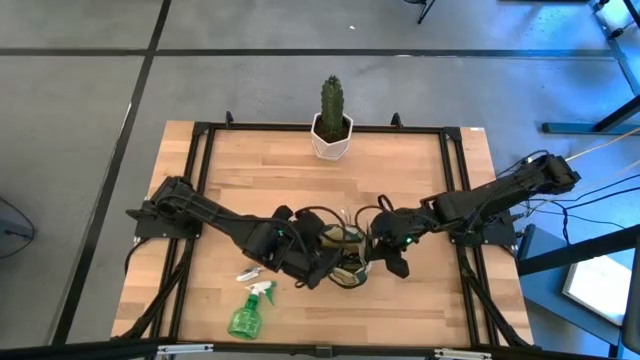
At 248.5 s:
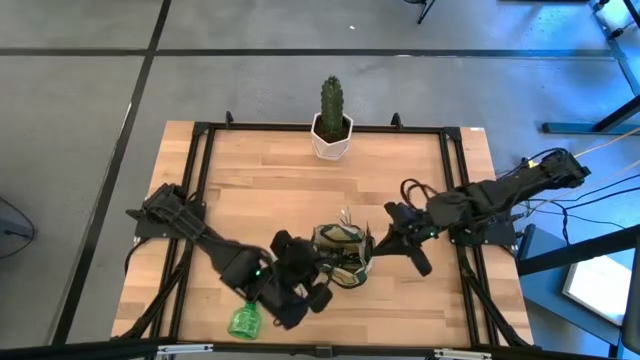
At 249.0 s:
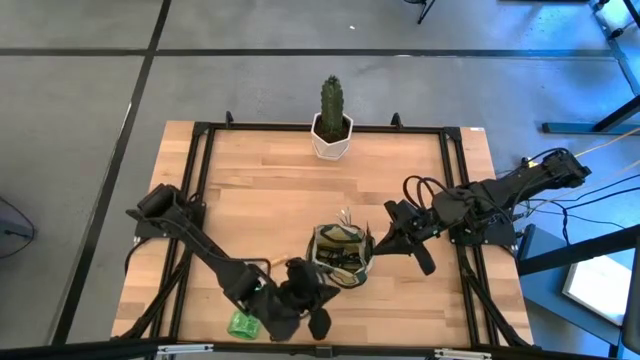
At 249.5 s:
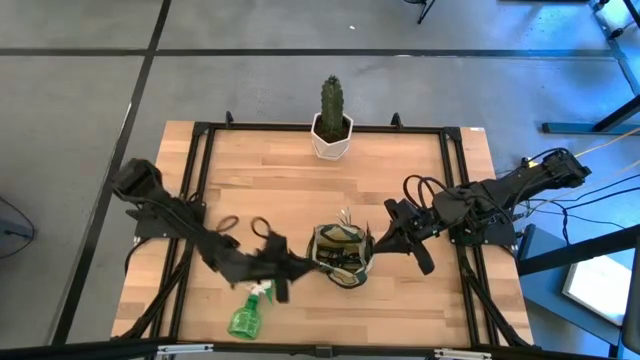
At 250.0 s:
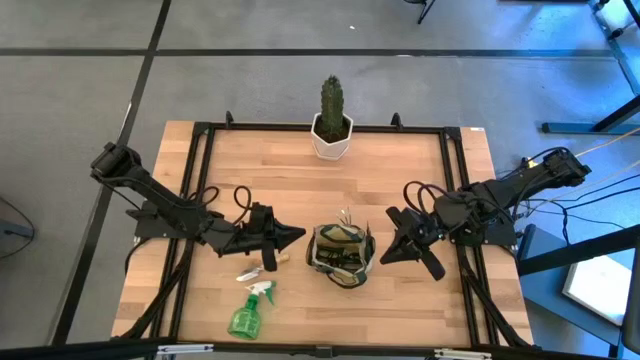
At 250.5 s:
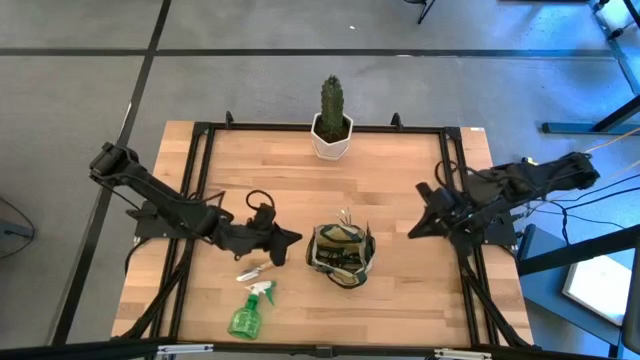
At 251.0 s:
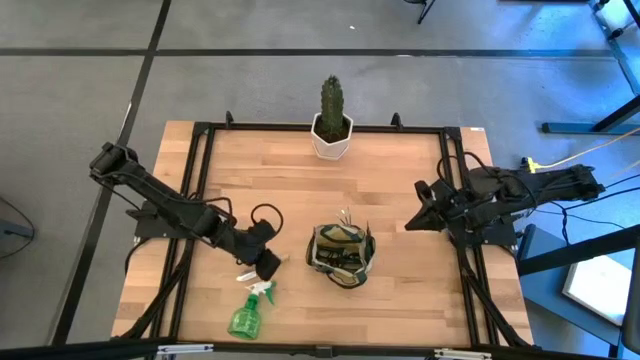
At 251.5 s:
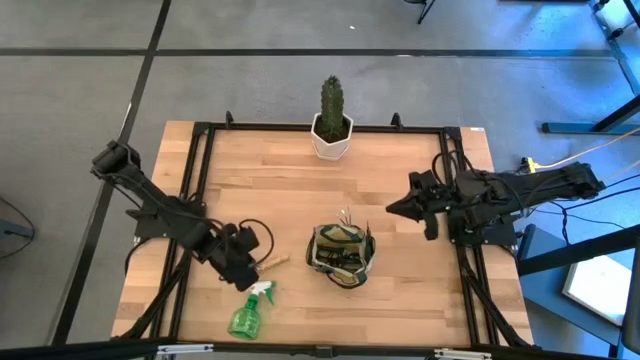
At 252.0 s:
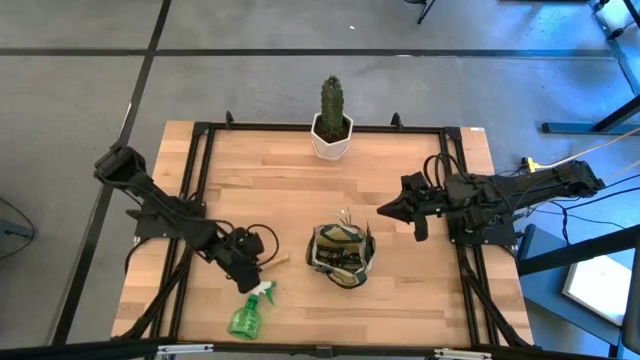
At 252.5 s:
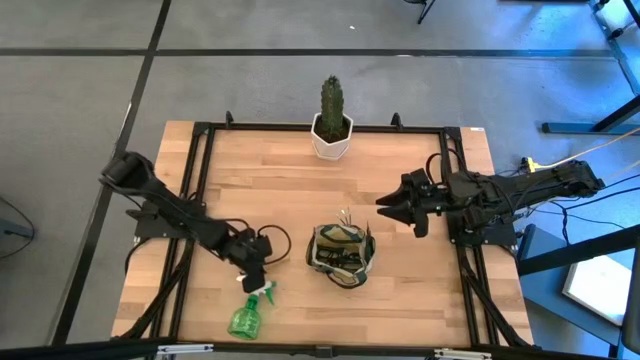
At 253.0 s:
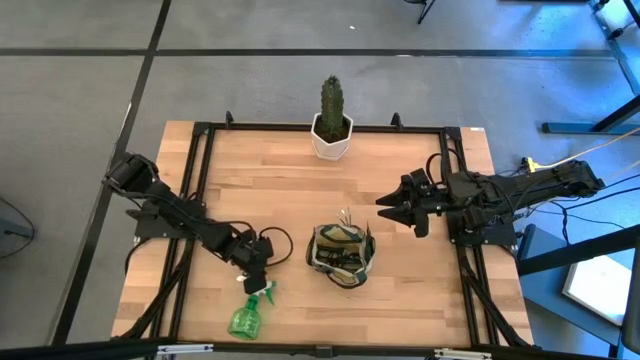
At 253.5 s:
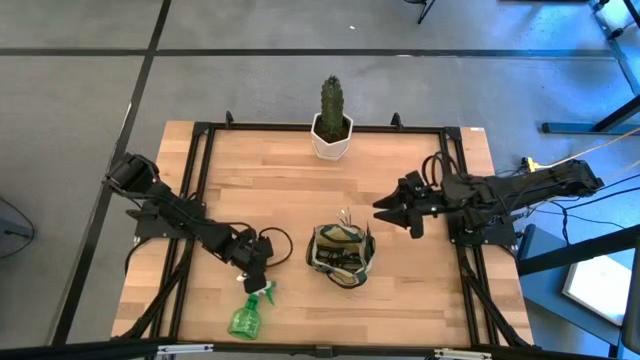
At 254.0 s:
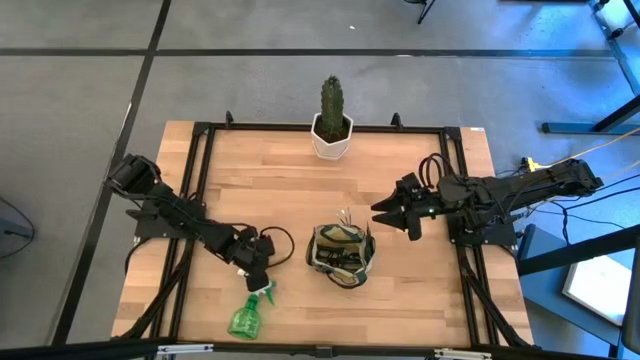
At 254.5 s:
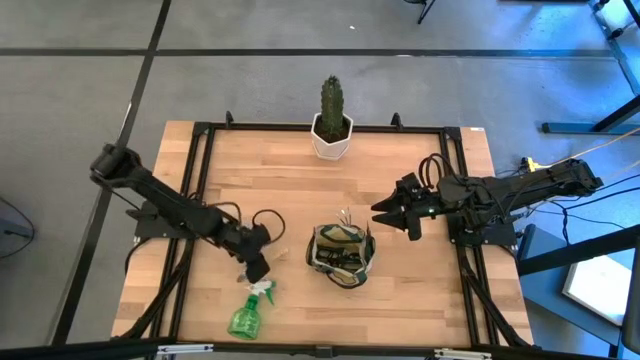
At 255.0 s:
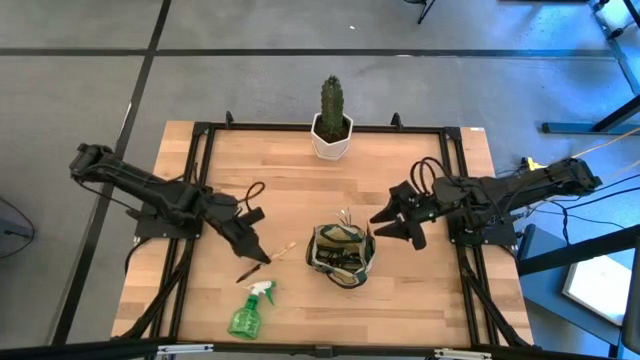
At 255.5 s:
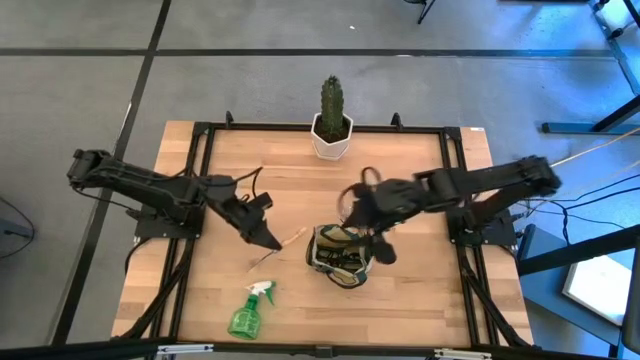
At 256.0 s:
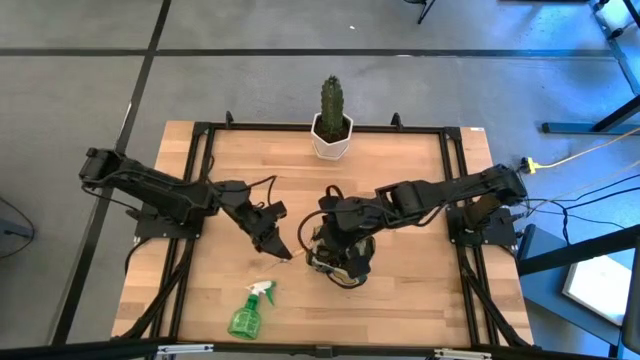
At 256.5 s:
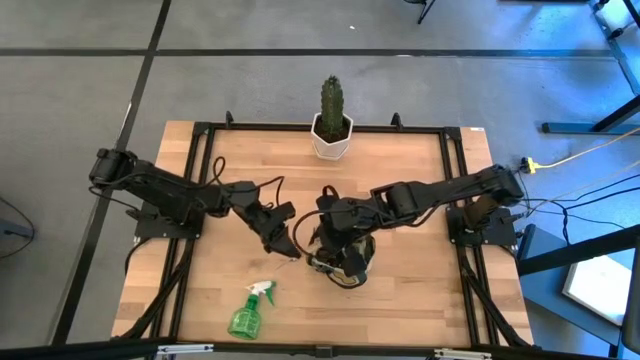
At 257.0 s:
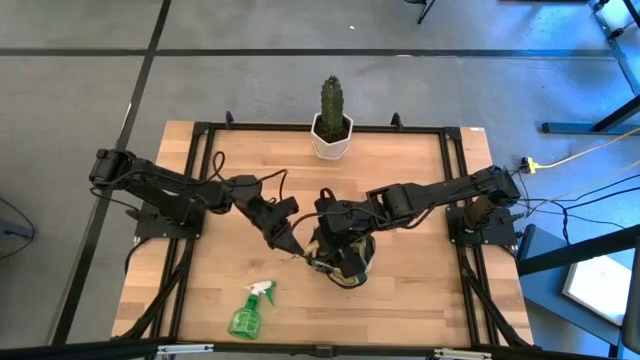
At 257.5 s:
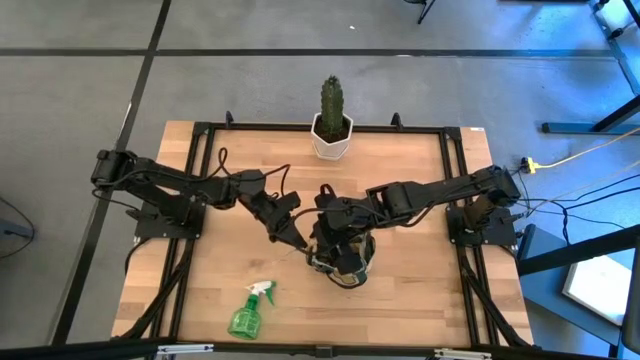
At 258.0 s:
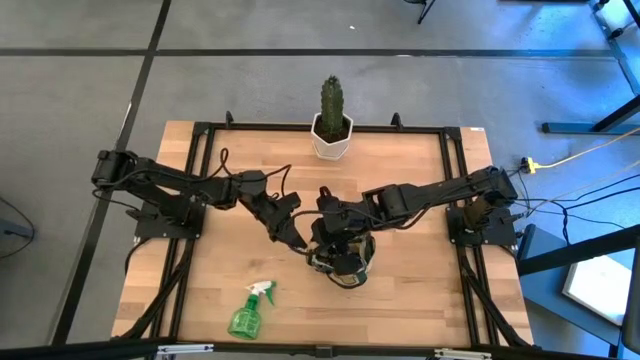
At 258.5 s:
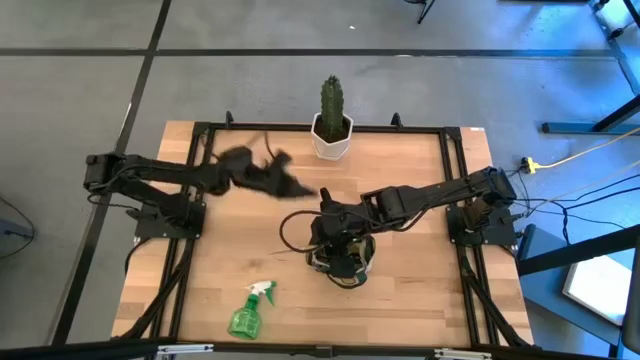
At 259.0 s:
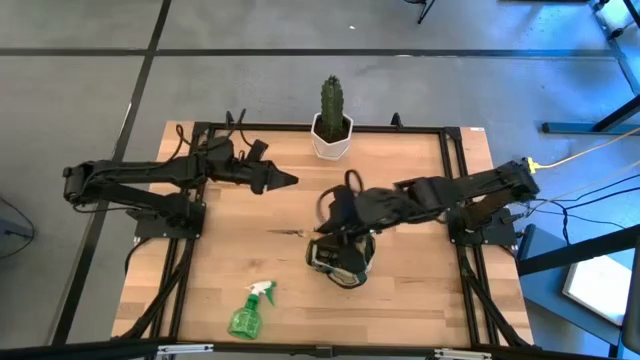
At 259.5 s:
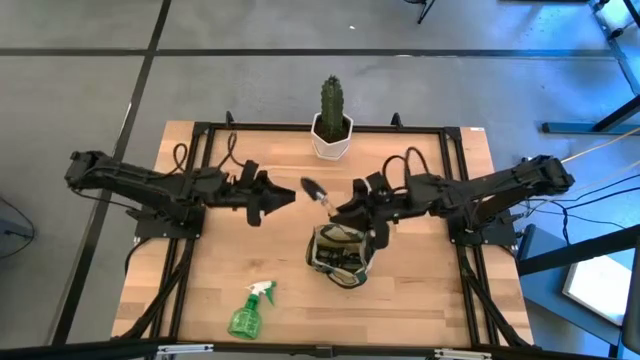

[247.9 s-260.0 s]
Task: Pick & Place Garden tools in Gardening bag
Put the brown trowel into the green gardening bag

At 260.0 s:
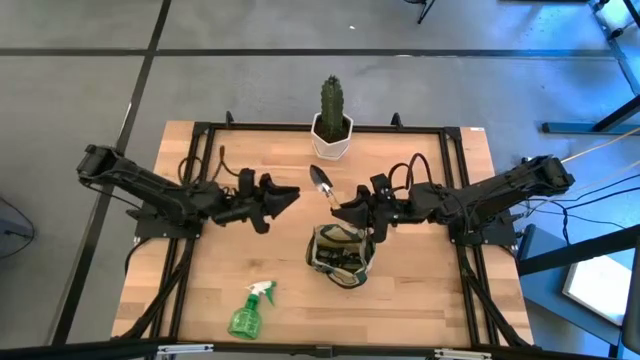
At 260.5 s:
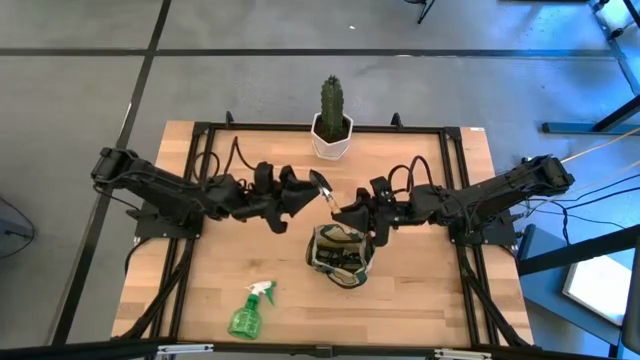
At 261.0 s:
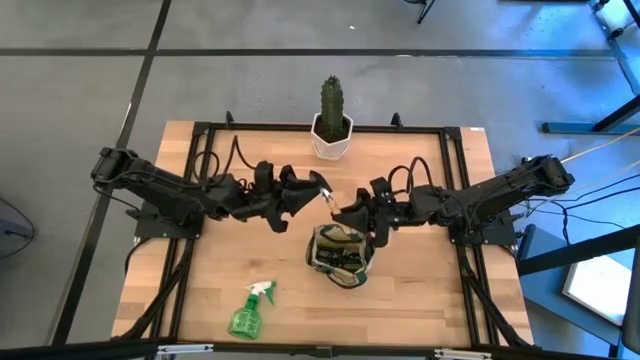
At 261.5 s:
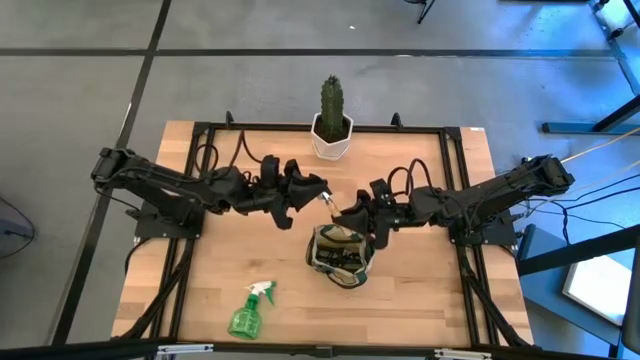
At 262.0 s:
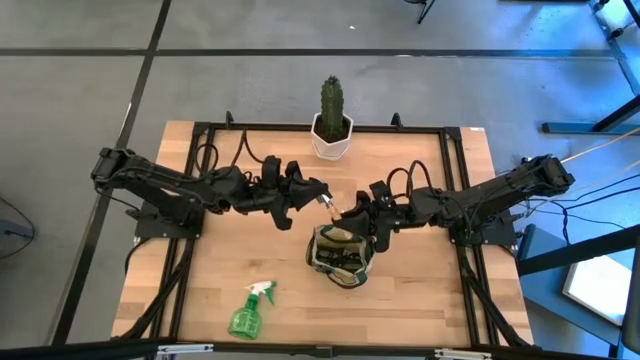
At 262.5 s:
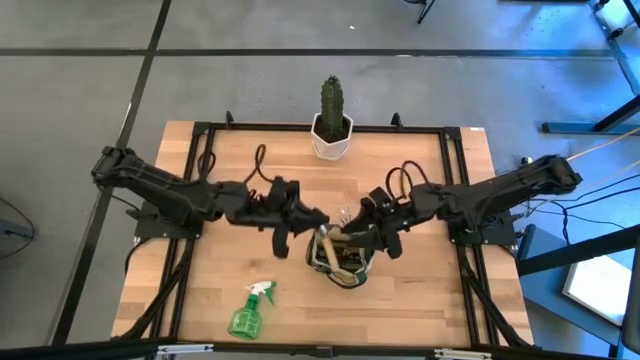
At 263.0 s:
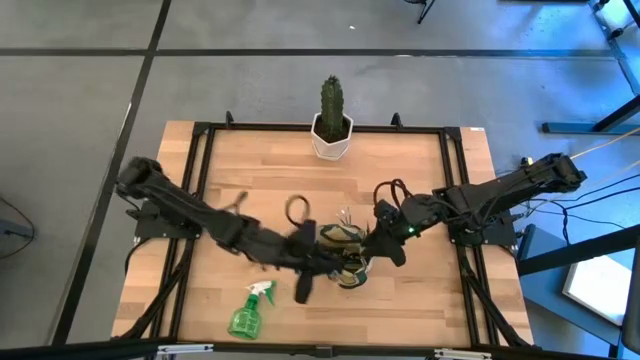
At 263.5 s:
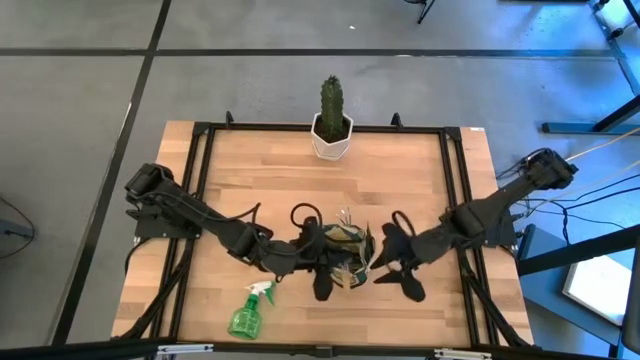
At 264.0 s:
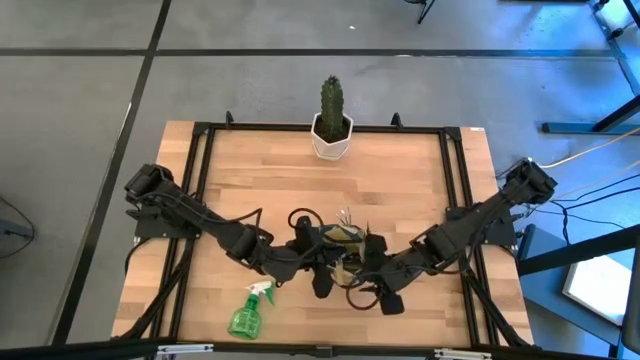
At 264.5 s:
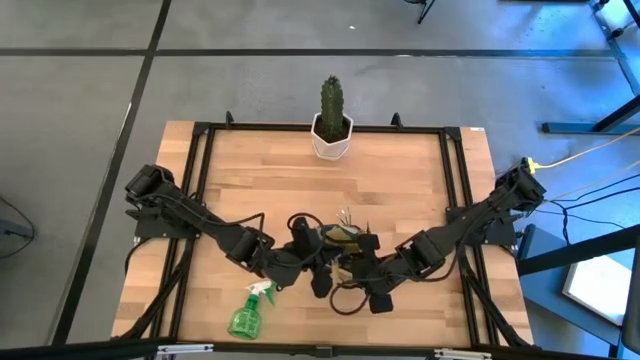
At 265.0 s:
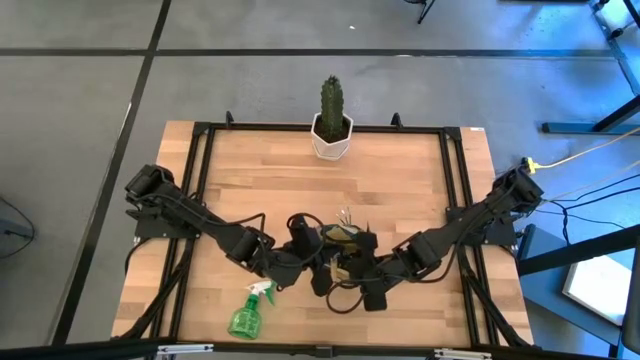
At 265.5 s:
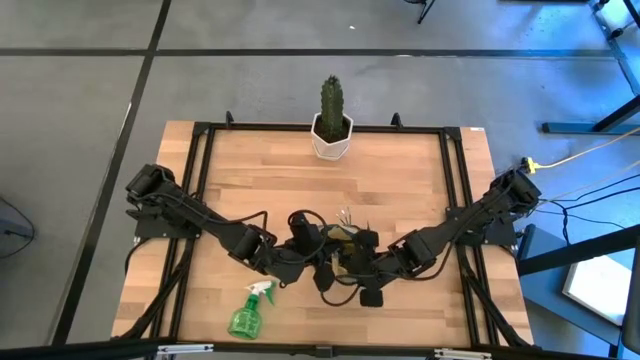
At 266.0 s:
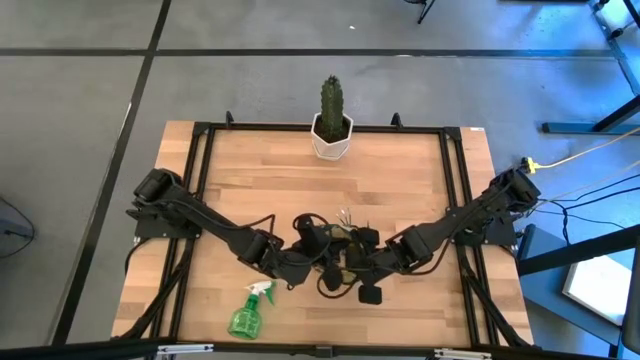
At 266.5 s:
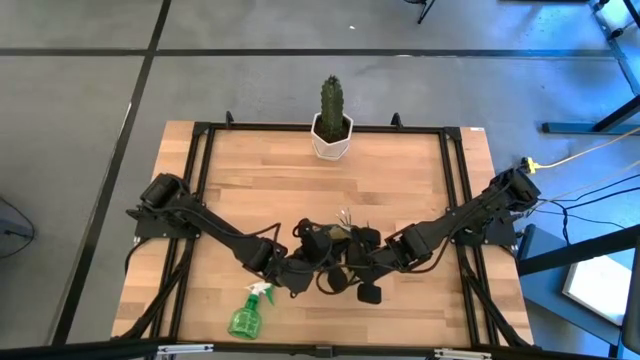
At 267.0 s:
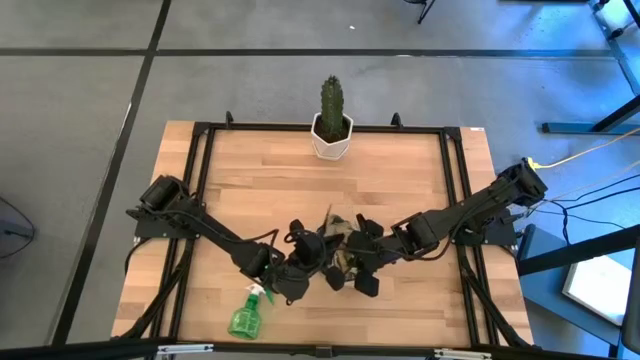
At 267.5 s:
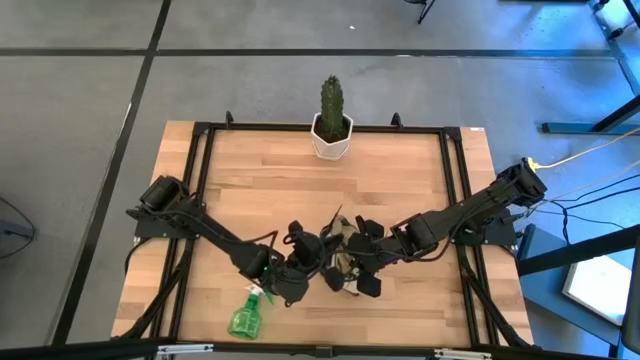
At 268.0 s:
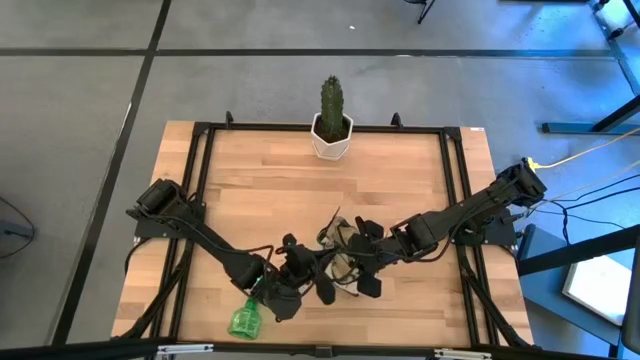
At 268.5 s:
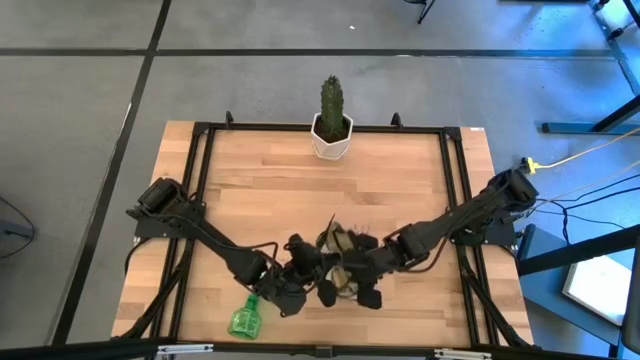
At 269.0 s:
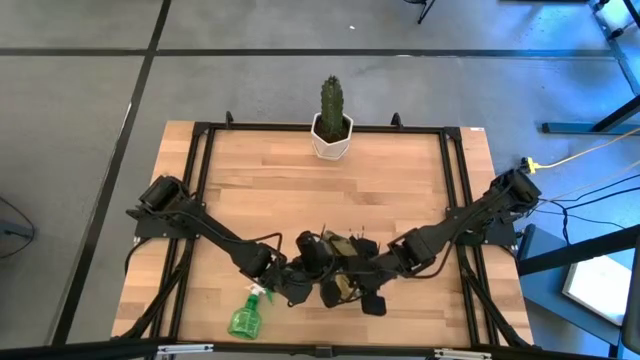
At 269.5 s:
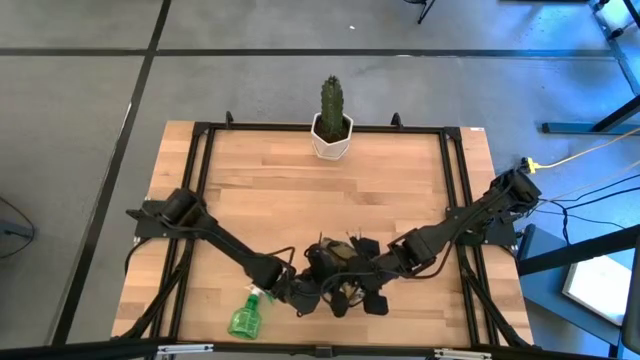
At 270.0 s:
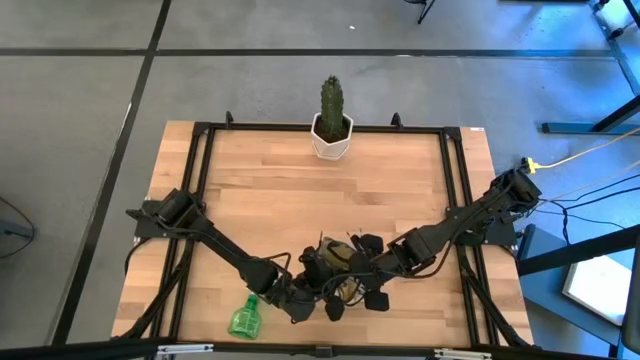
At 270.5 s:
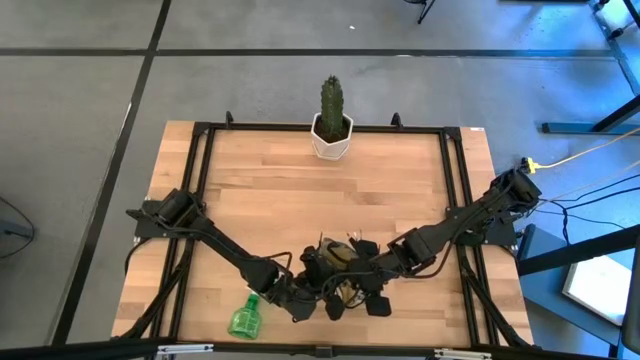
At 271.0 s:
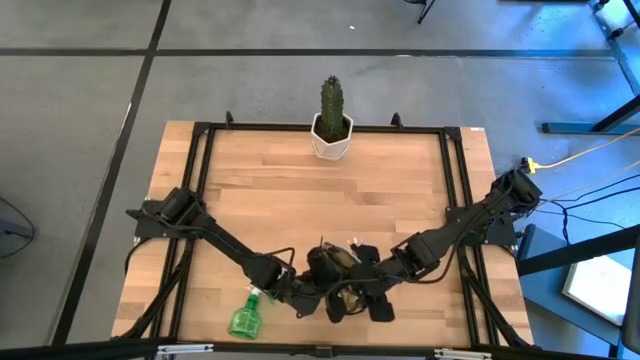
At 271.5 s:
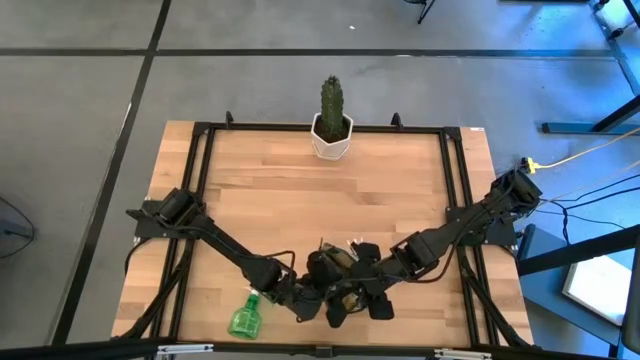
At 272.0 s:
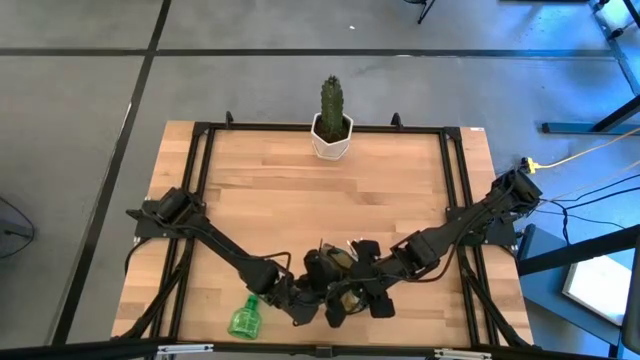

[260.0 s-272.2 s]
Put the brown trowel into the green gardening bag
